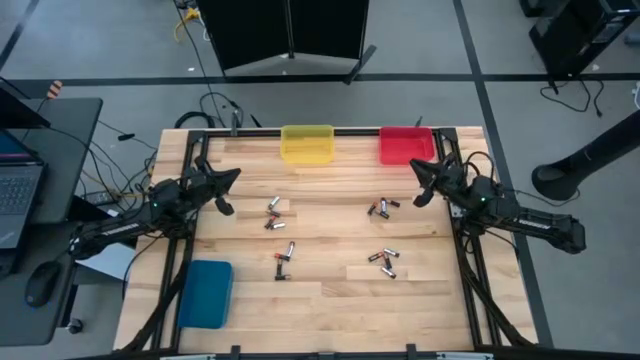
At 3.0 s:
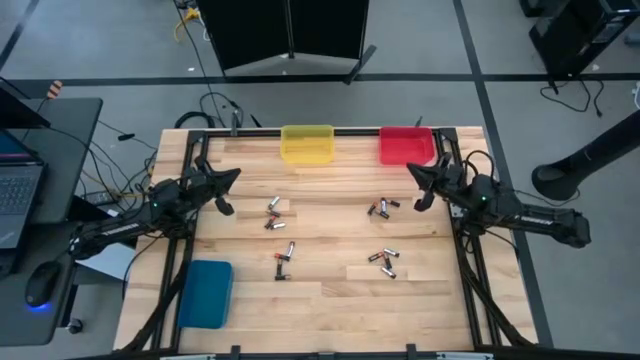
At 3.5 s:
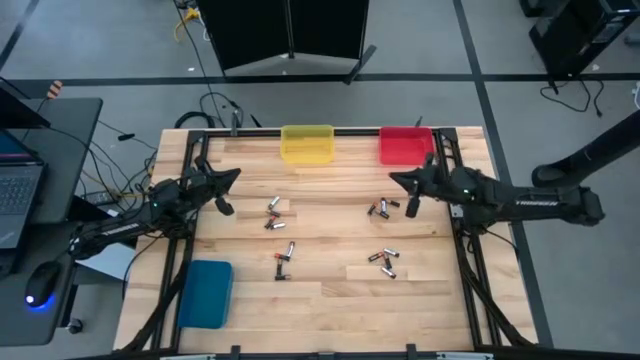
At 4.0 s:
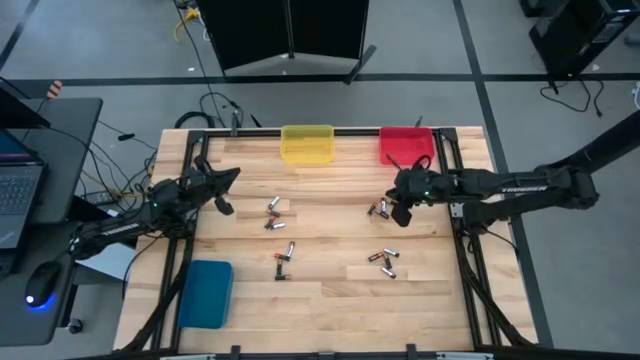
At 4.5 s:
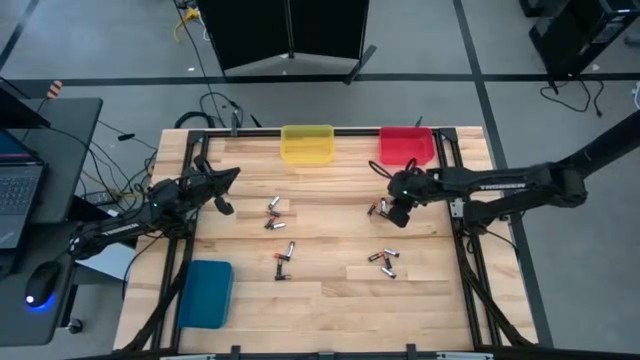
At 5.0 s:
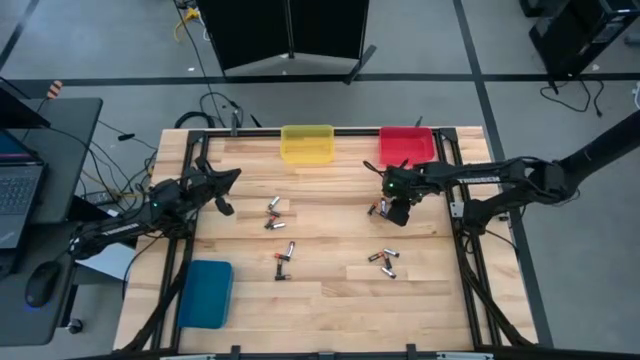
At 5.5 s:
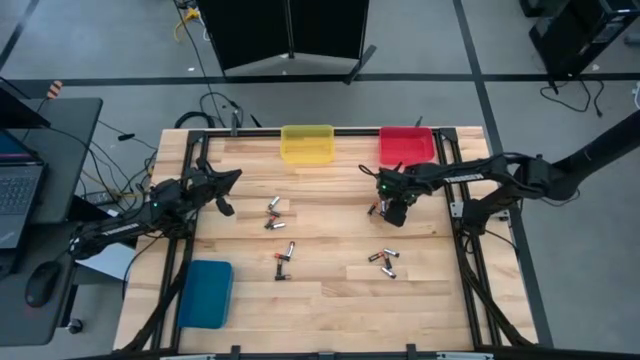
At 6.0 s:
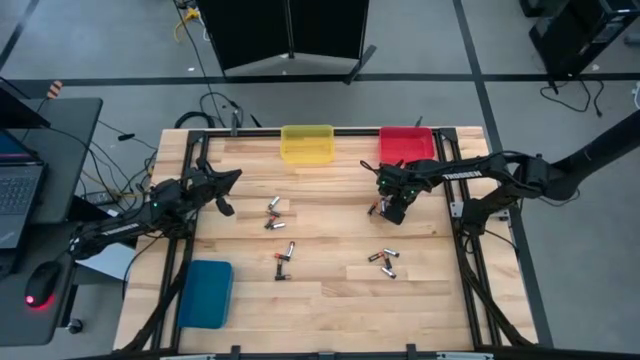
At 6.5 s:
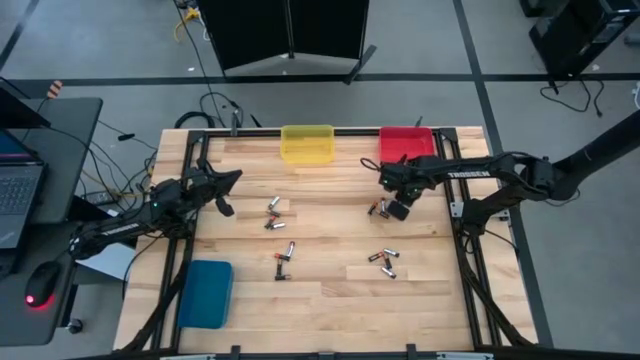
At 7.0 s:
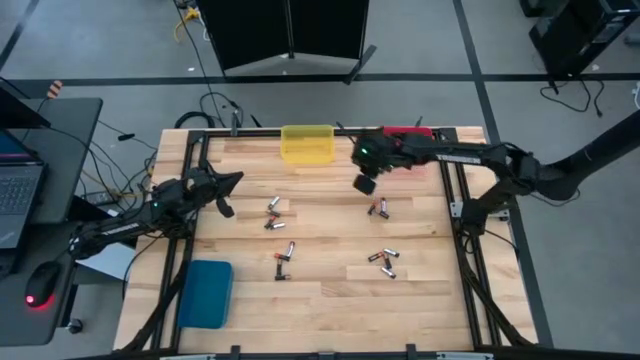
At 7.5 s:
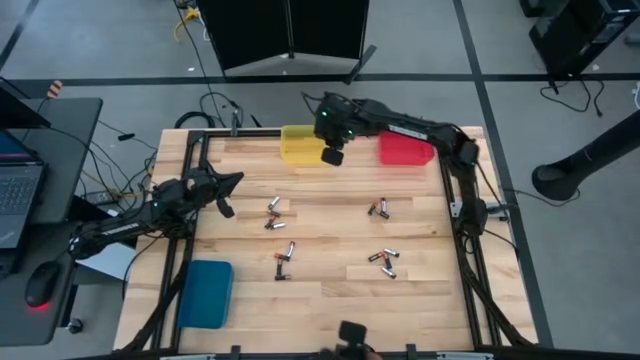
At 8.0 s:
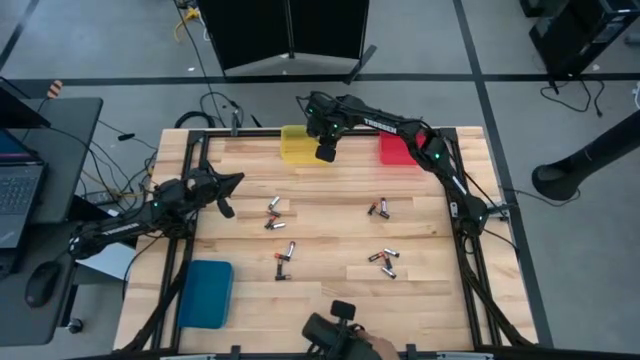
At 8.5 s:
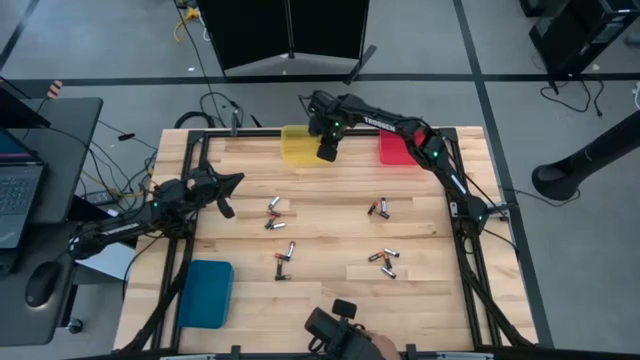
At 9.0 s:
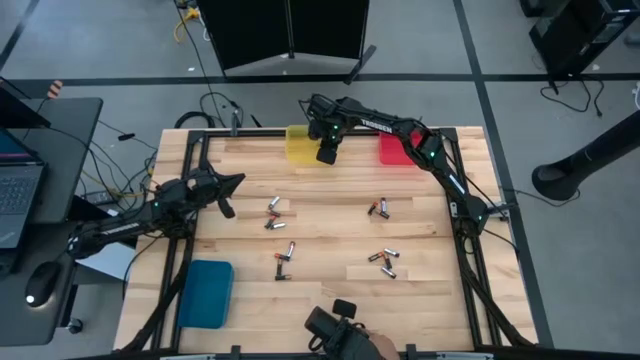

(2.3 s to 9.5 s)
Task: Sort batteries
Put the black-brown battery into the yellow bin

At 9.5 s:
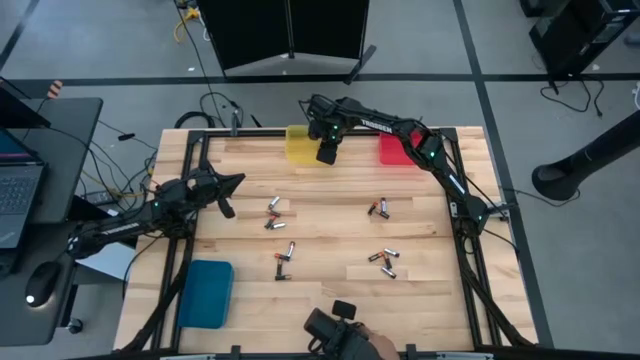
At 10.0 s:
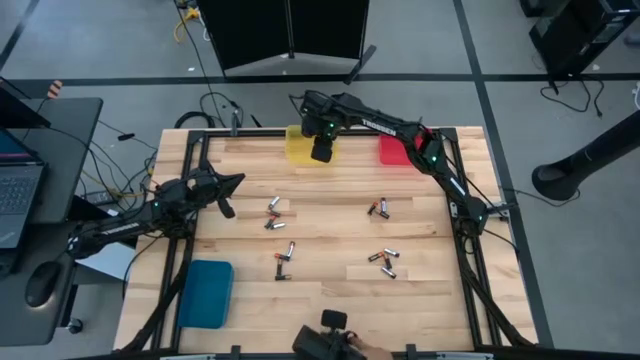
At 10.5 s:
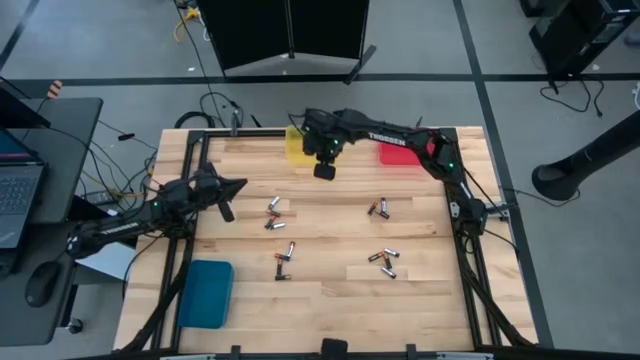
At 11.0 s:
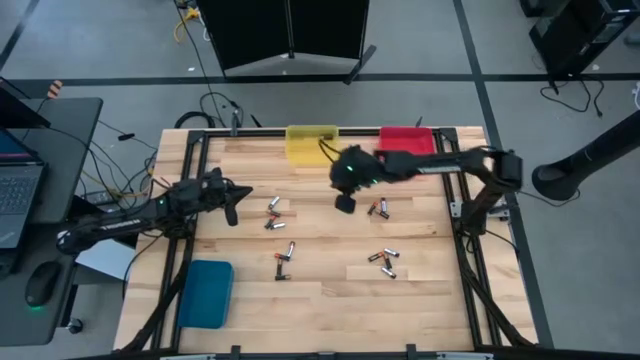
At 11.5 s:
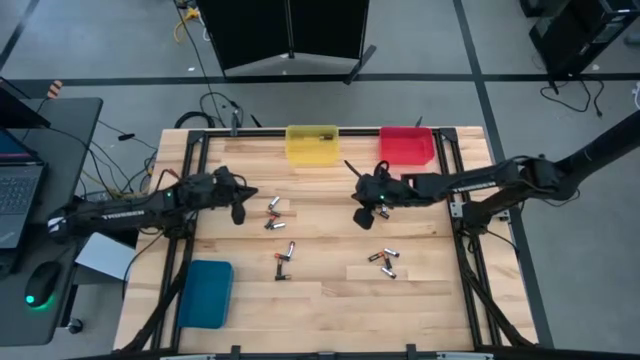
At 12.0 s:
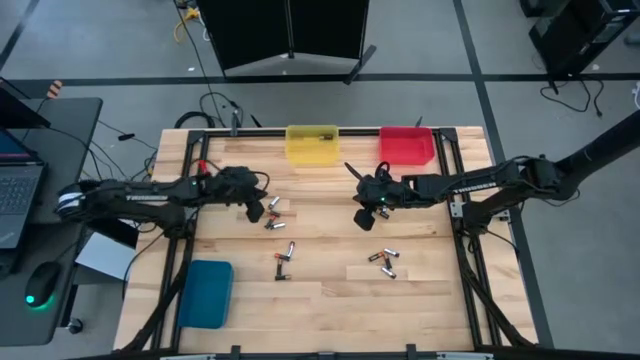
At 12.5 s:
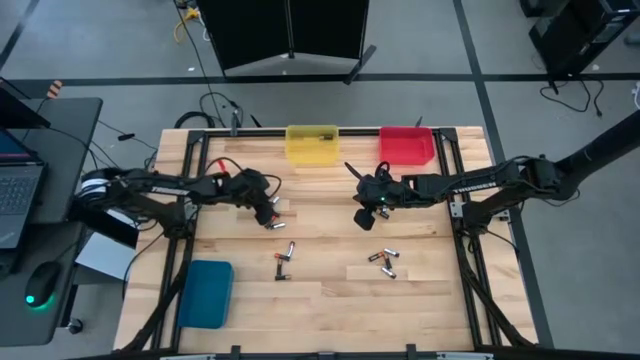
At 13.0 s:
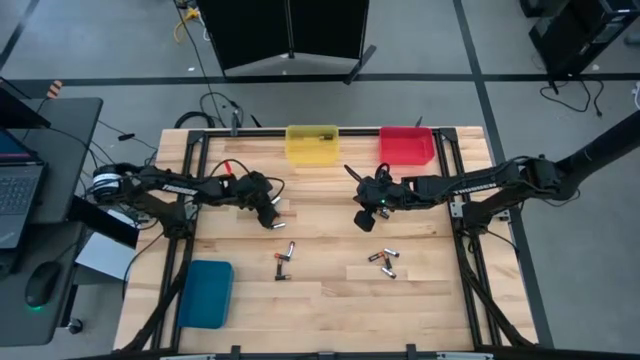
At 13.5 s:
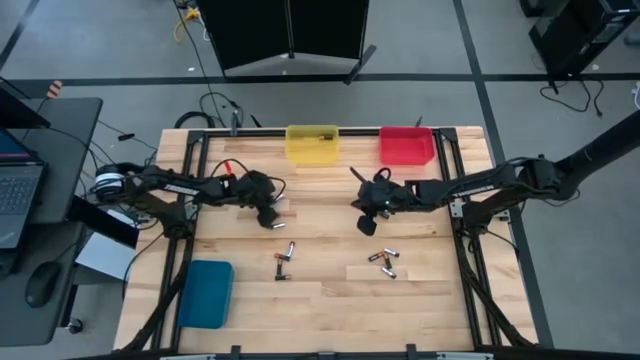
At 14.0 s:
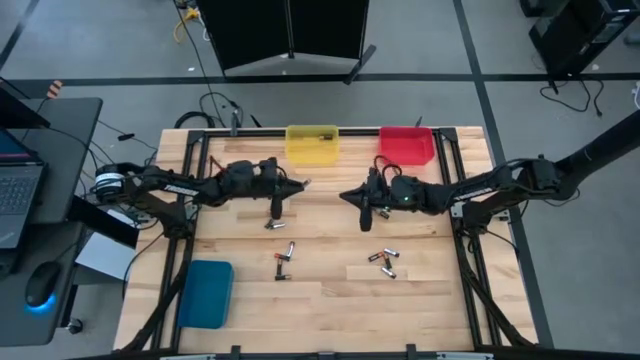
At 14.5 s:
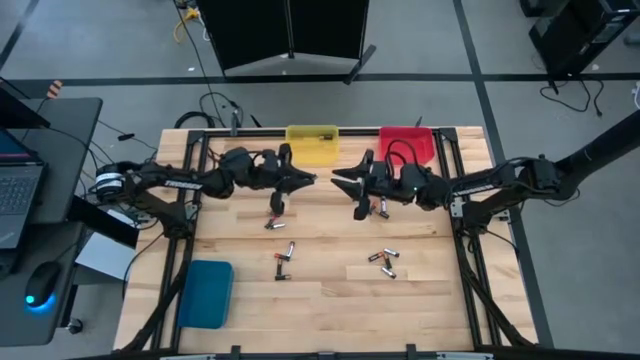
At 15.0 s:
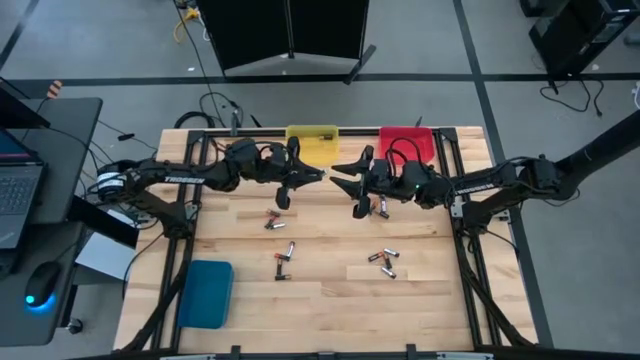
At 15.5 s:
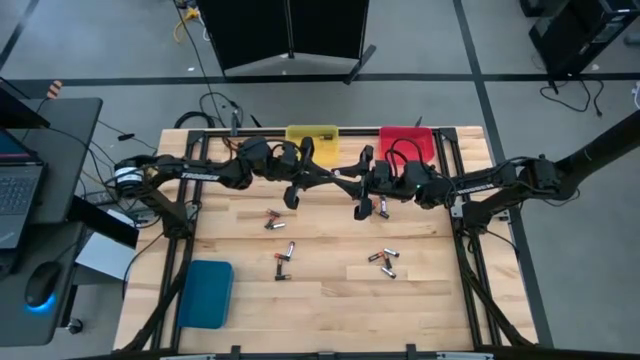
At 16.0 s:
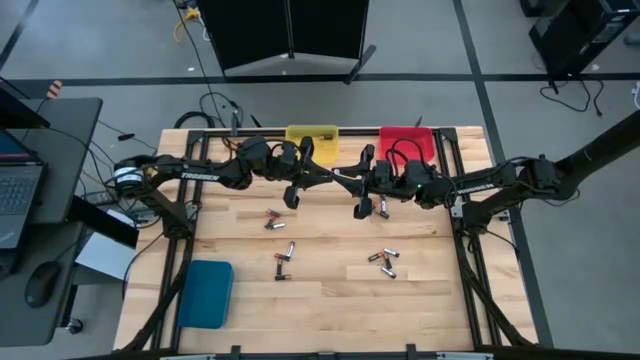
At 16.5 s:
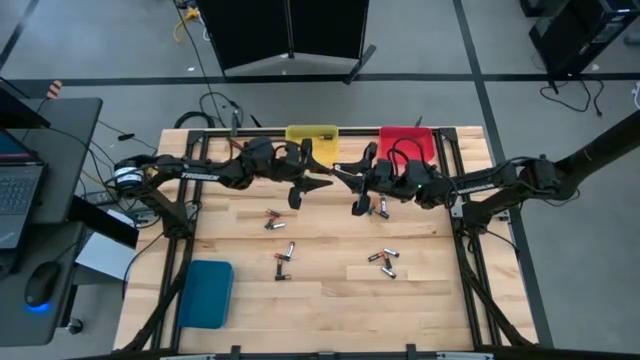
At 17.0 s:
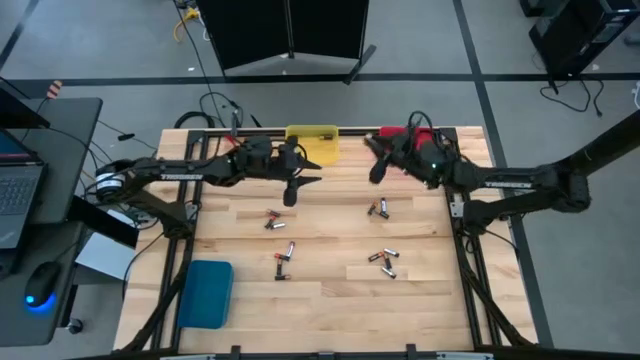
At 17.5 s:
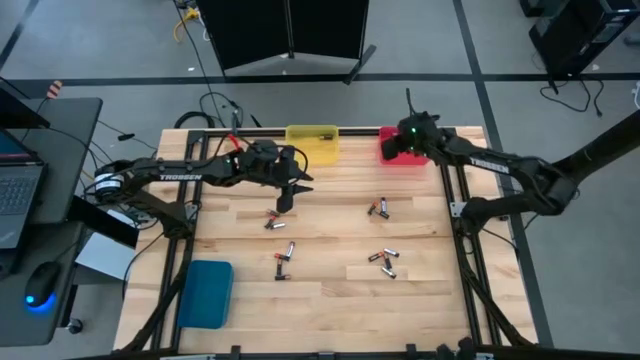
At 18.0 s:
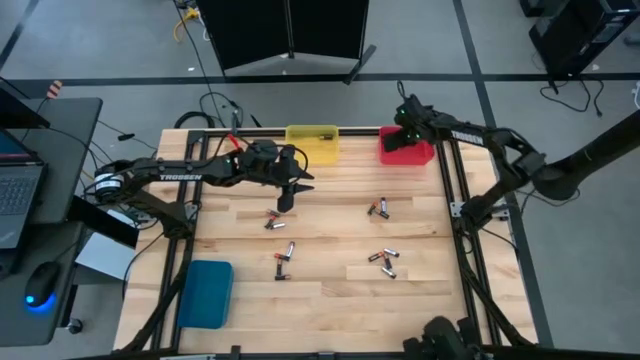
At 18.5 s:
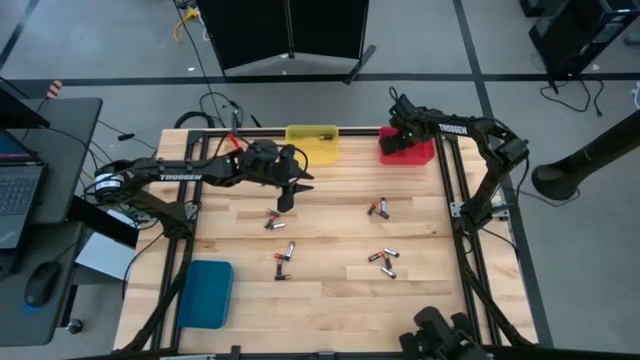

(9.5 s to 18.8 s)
Put the silver battery into the red bin

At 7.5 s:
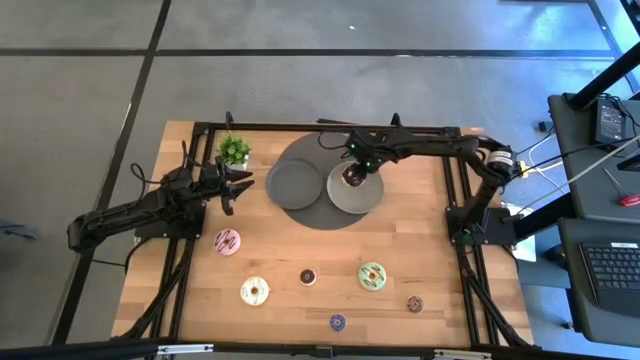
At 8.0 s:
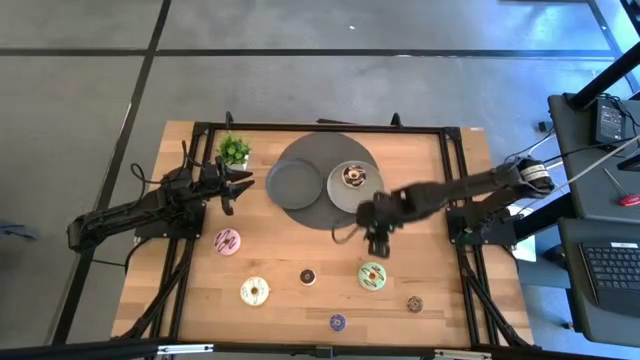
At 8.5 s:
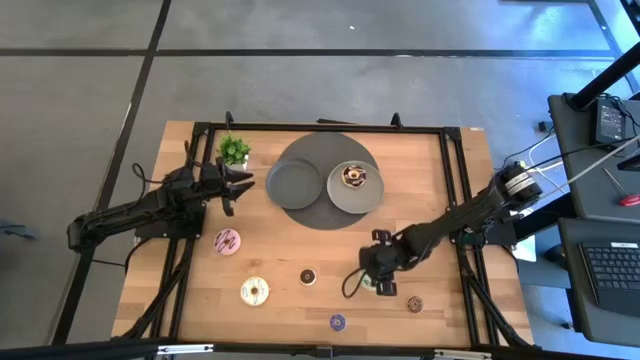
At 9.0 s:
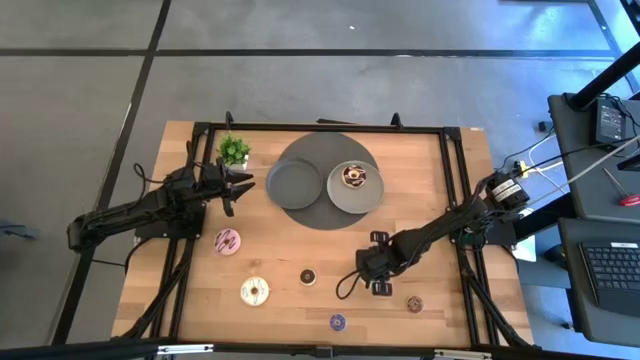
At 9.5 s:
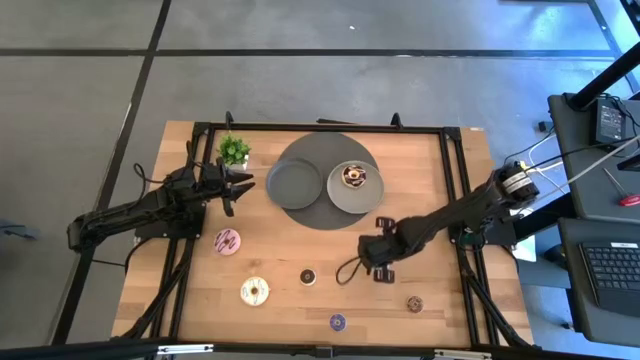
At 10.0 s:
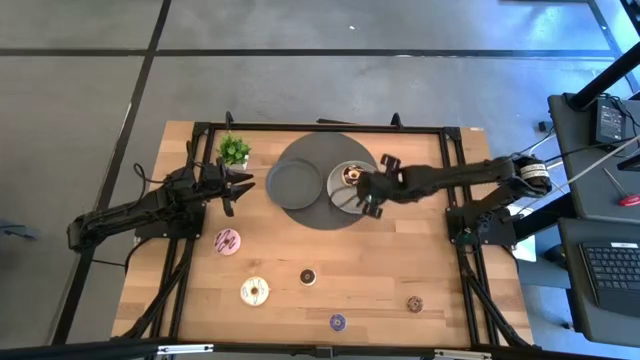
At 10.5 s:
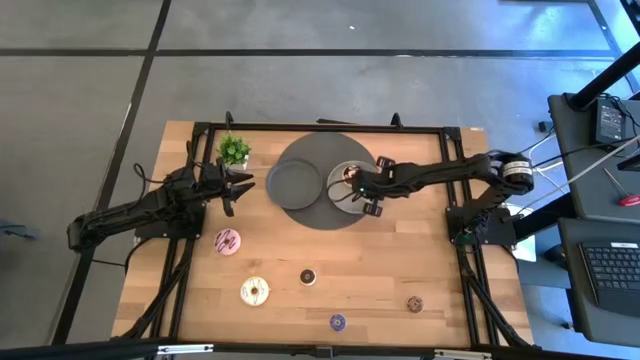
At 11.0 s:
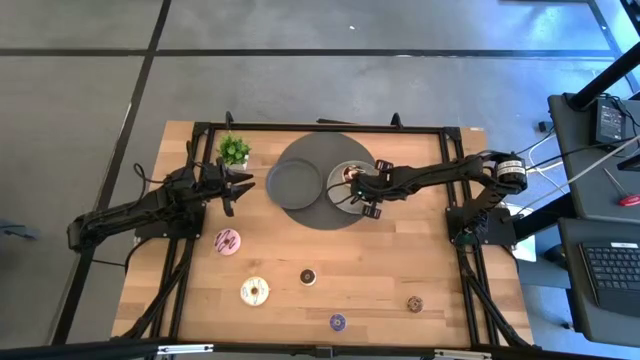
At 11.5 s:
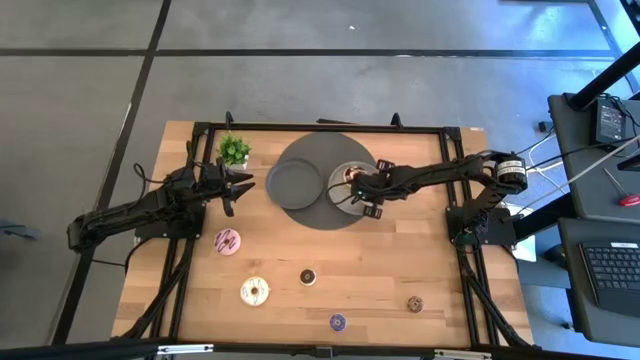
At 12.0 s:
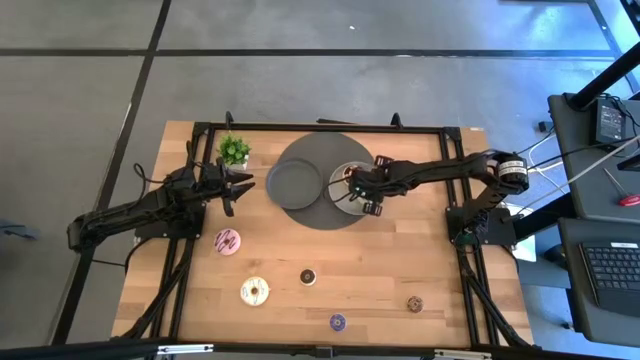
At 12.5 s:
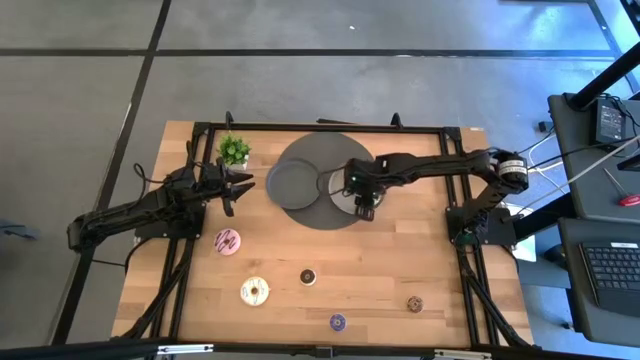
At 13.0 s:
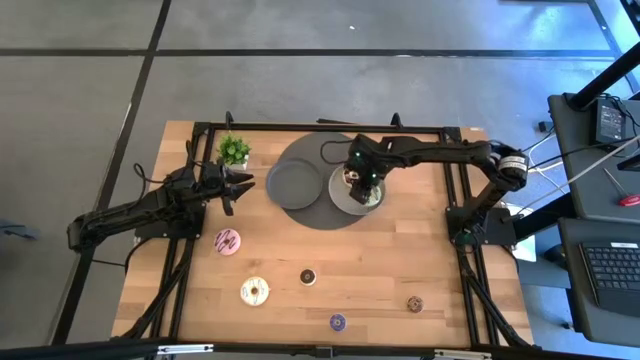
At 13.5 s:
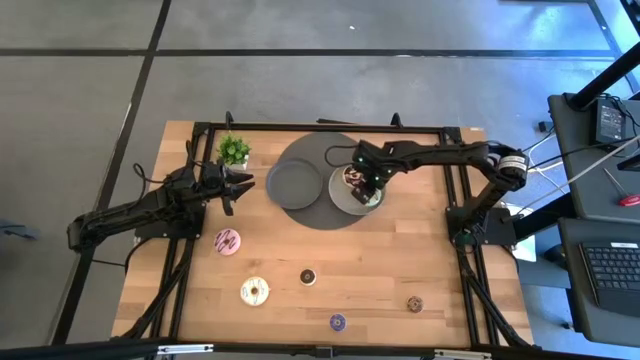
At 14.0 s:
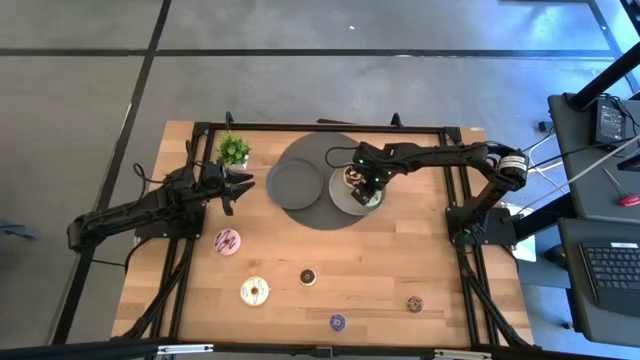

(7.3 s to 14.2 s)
Task: Pick & Place donuts
Put the large blue donut on the gray plate
